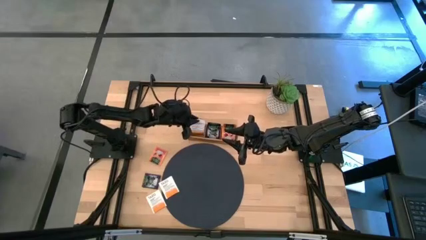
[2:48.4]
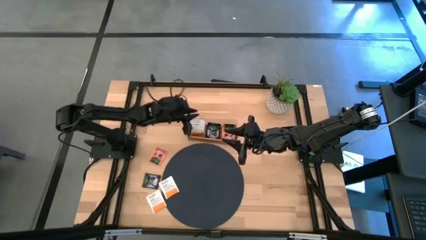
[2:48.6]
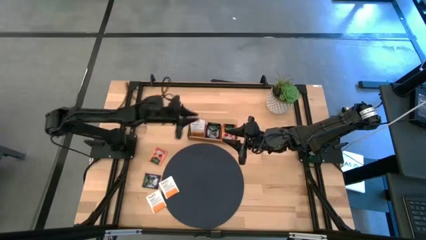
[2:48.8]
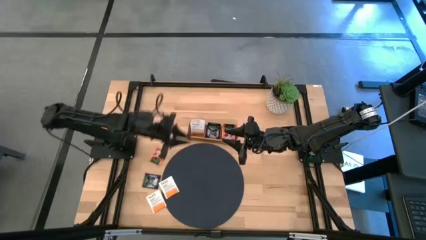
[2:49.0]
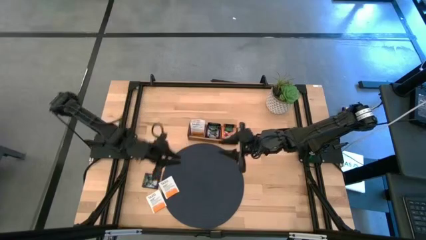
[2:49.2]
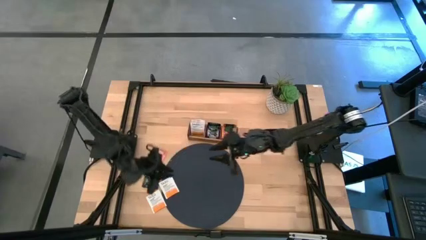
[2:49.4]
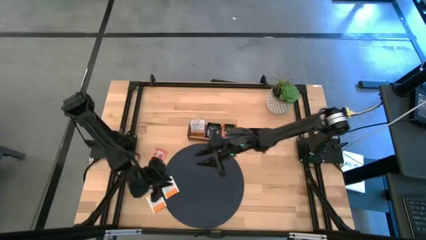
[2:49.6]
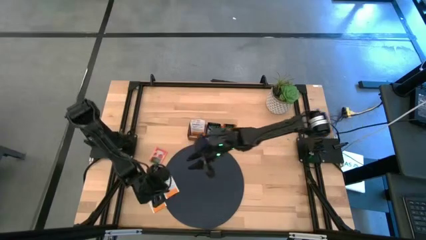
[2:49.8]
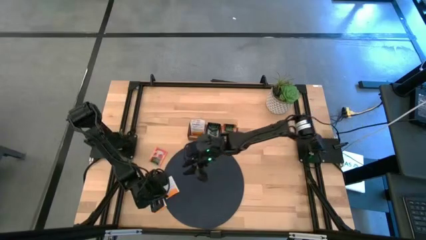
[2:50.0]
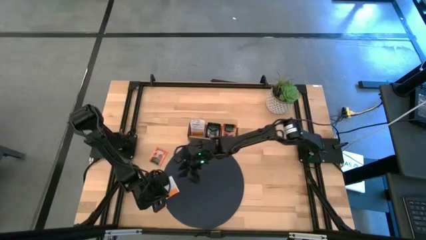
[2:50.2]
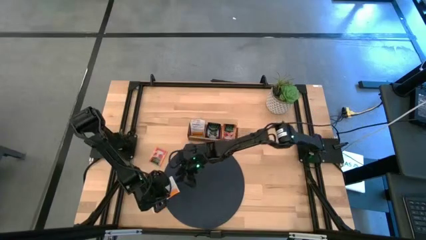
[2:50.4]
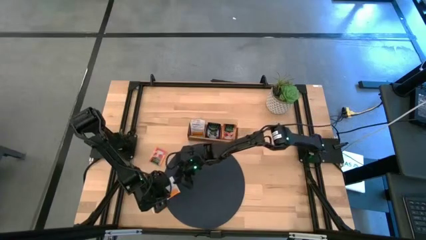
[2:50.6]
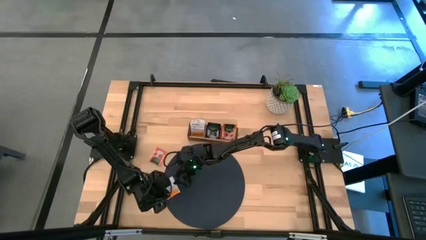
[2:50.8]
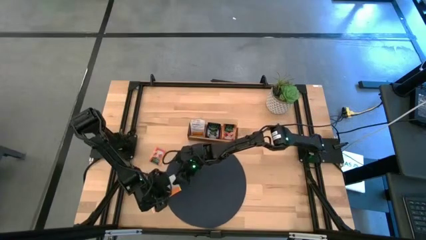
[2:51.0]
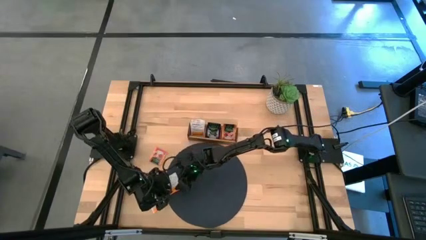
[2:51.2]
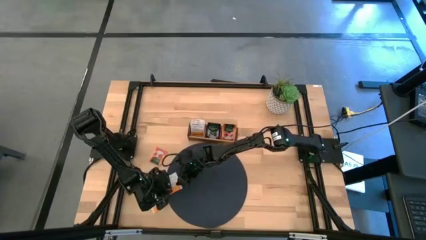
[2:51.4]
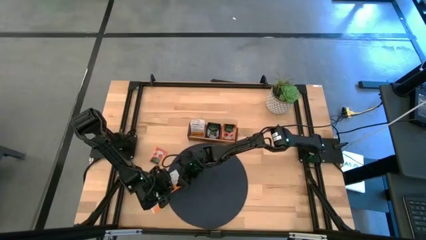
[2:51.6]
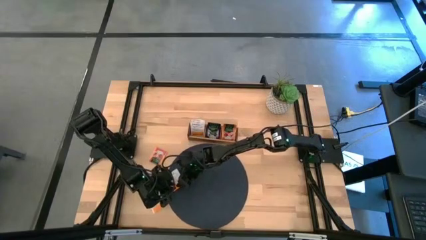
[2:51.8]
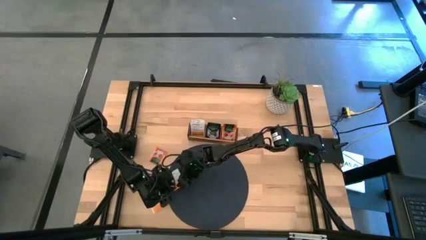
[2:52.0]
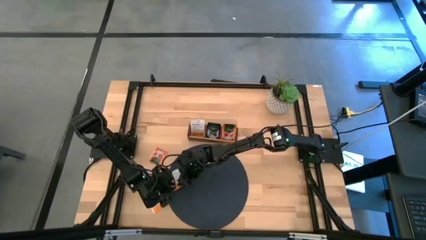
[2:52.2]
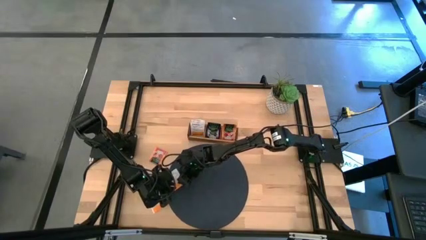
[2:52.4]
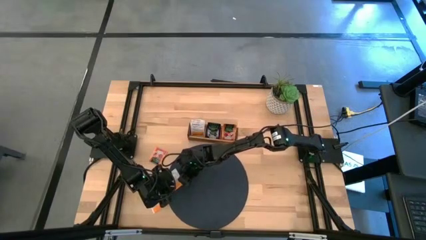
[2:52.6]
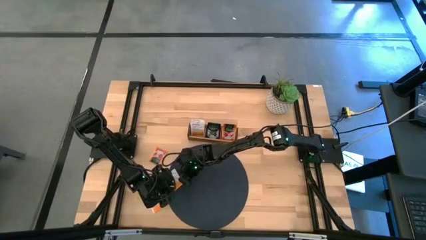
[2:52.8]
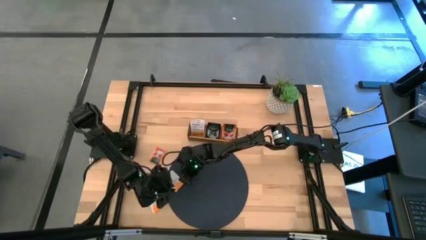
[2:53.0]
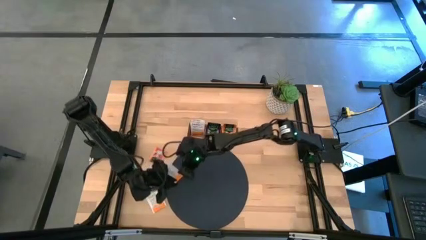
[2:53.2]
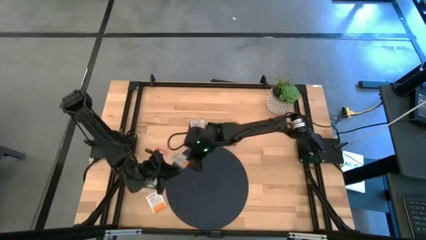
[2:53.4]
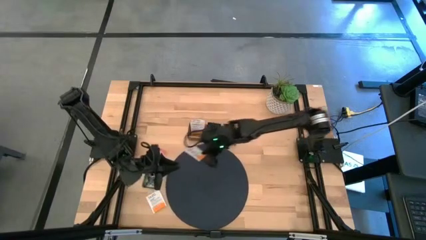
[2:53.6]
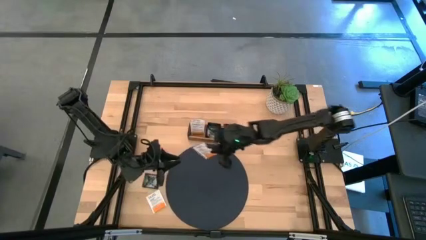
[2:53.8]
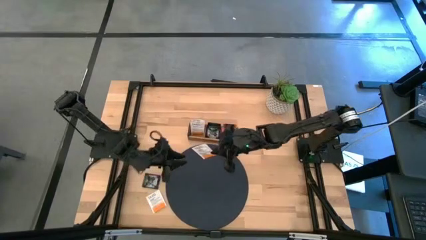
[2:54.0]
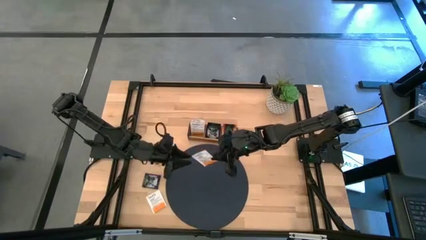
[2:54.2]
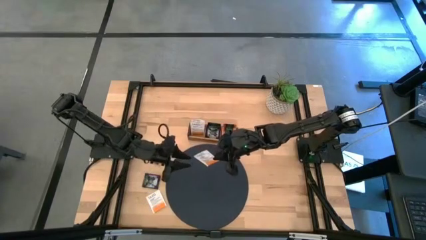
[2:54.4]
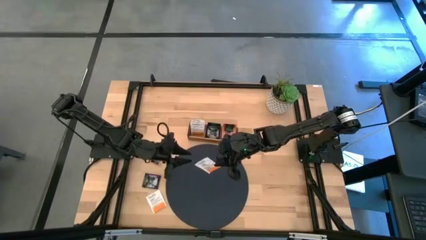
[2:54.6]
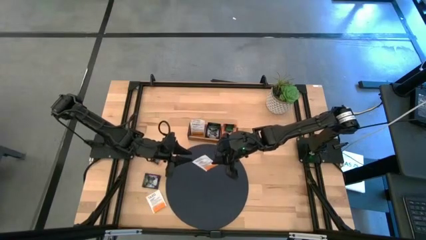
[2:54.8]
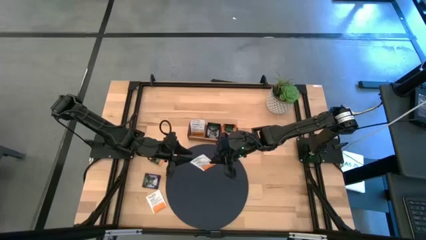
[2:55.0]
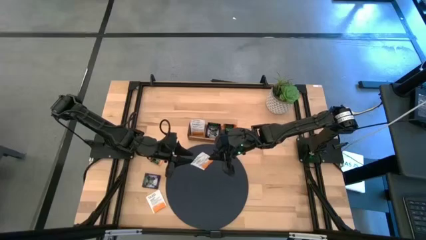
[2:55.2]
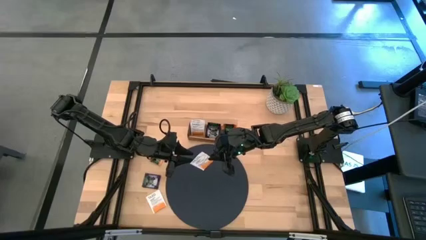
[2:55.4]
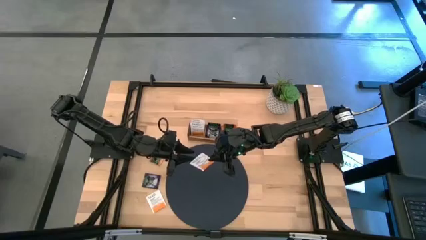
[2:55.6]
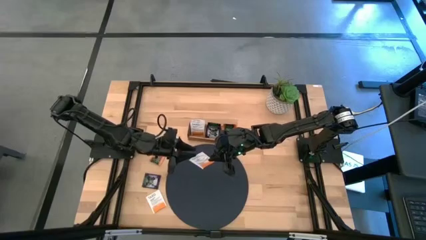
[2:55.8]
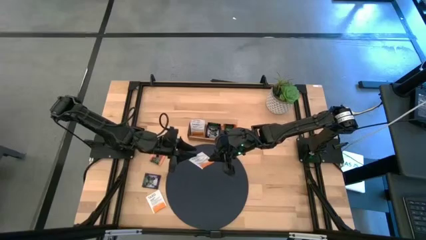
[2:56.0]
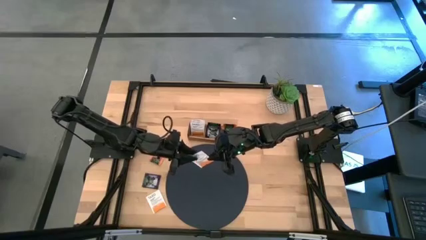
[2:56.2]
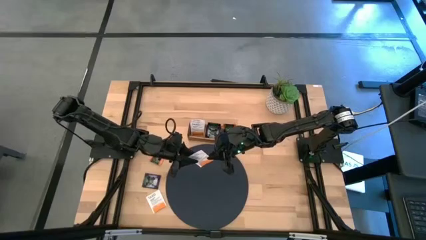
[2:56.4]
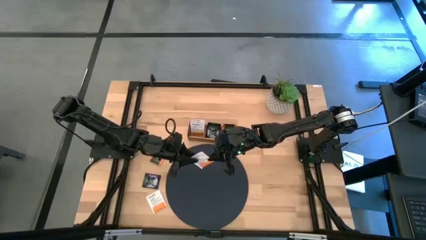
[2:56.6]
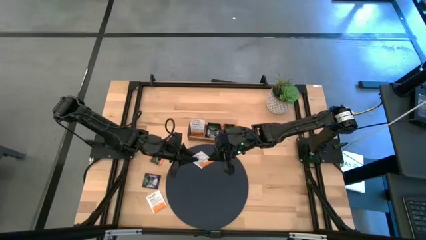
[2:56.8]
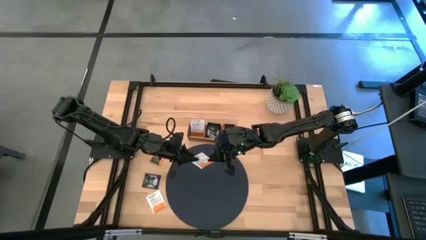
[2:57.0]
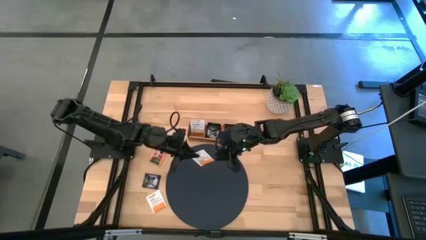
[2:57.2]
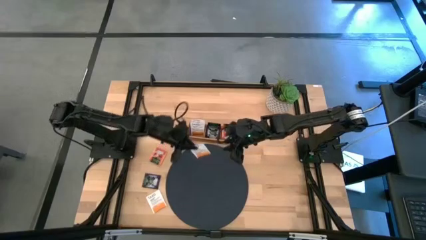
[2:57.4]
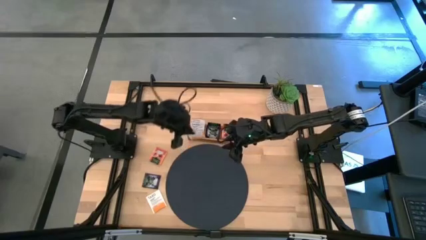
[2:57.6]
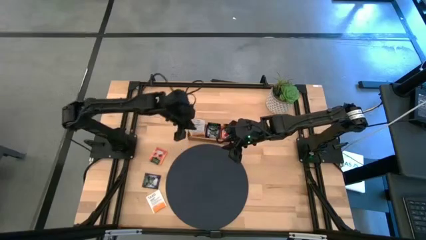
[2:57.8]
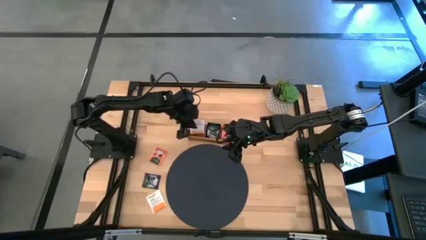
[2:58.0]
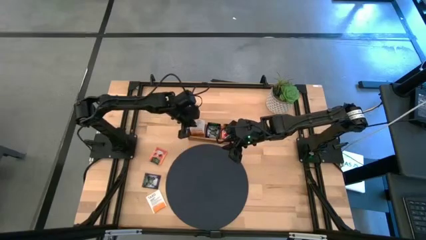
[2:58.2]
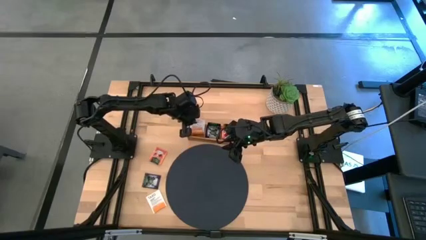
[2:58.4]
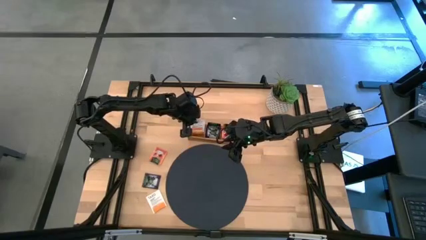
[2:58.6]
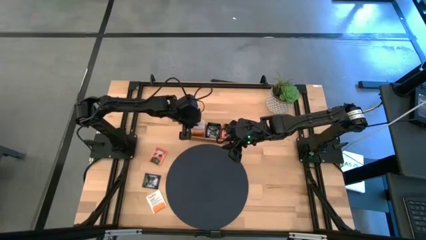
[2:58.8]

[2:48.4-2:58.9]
Task: Pick & Place Tea
Put the white tea bag into the left of the wooden organizer

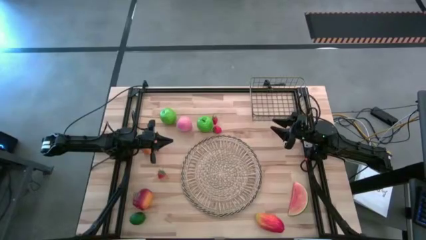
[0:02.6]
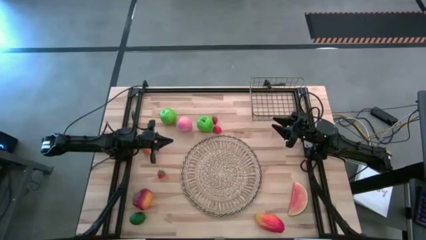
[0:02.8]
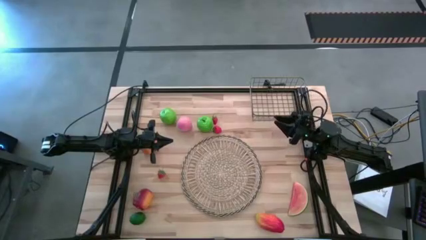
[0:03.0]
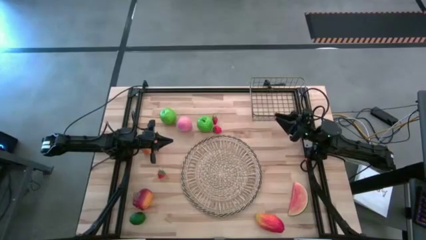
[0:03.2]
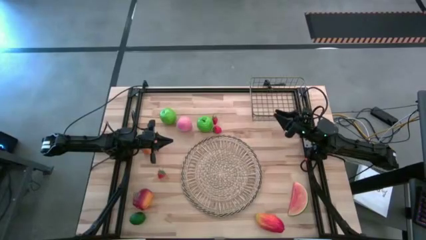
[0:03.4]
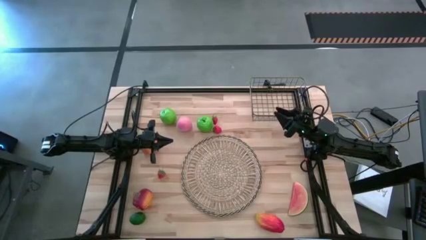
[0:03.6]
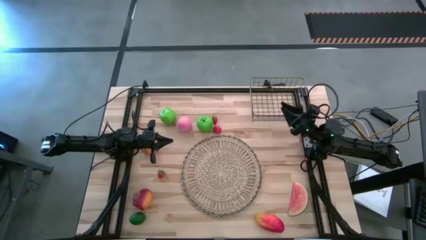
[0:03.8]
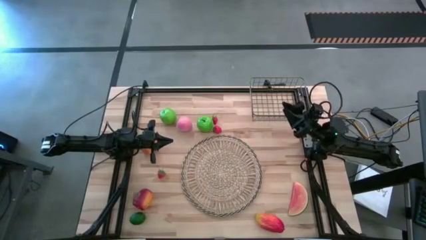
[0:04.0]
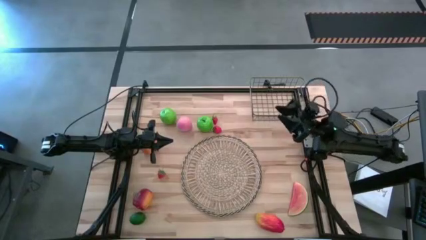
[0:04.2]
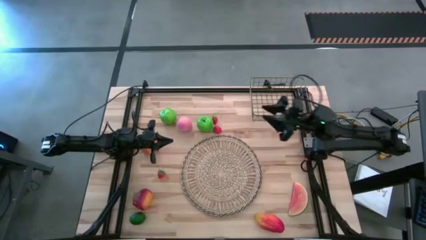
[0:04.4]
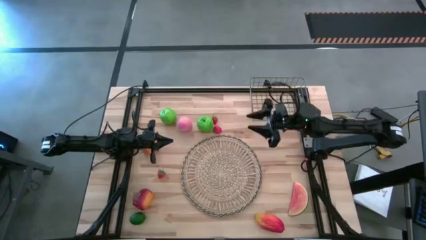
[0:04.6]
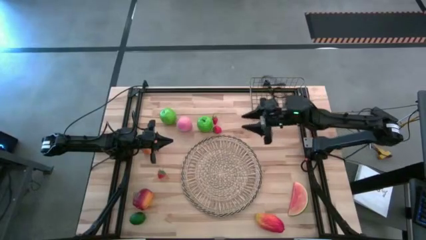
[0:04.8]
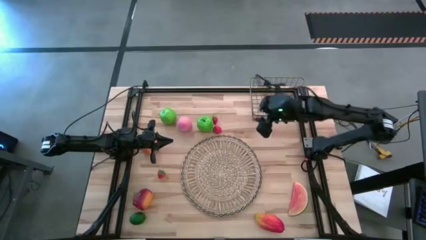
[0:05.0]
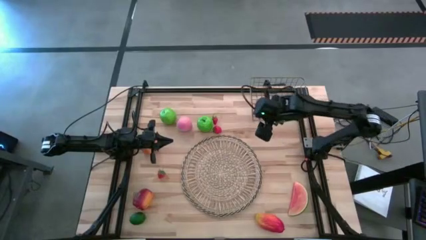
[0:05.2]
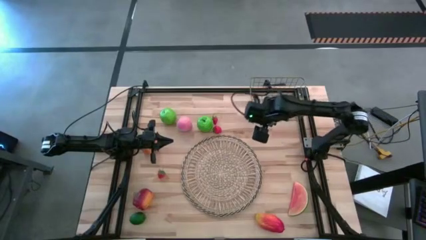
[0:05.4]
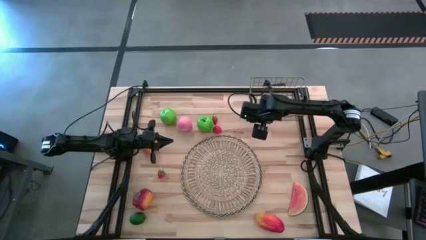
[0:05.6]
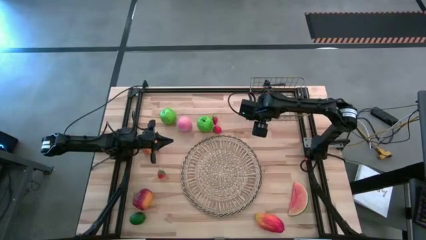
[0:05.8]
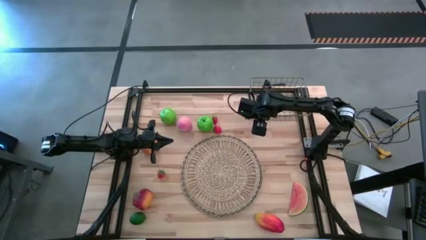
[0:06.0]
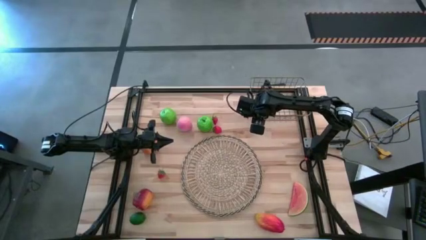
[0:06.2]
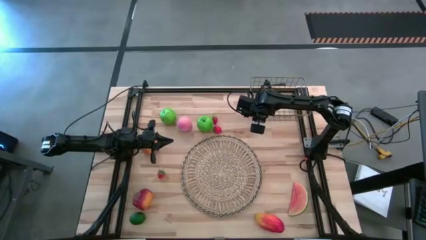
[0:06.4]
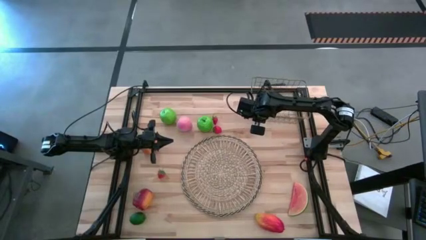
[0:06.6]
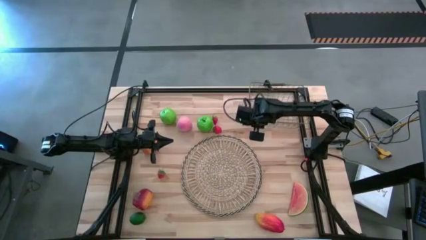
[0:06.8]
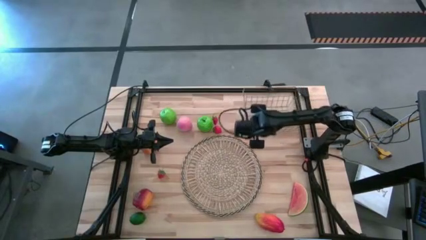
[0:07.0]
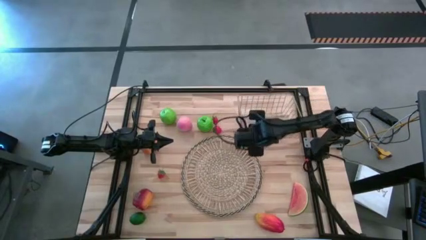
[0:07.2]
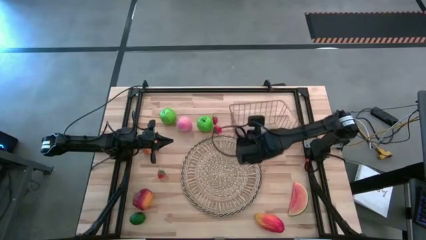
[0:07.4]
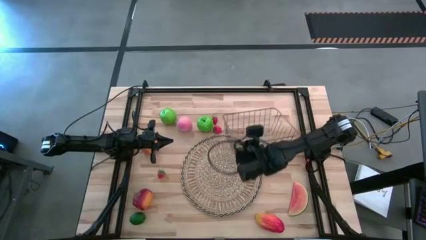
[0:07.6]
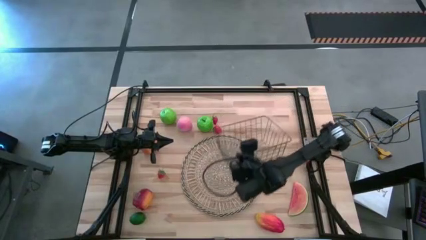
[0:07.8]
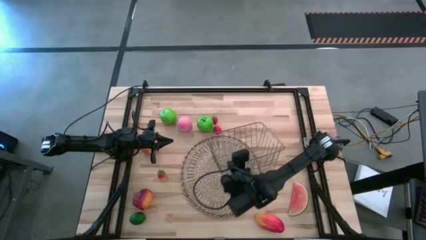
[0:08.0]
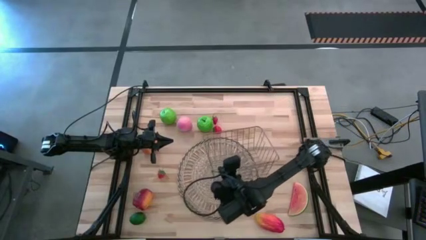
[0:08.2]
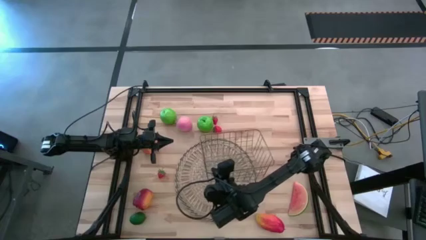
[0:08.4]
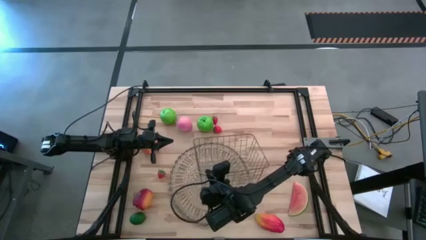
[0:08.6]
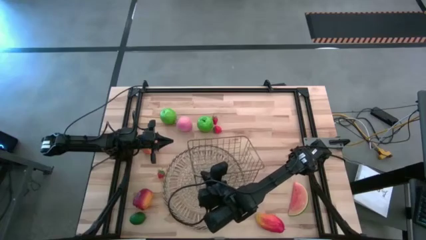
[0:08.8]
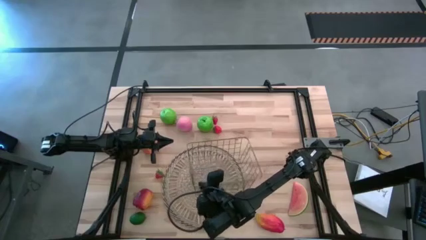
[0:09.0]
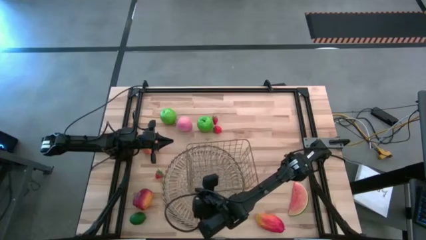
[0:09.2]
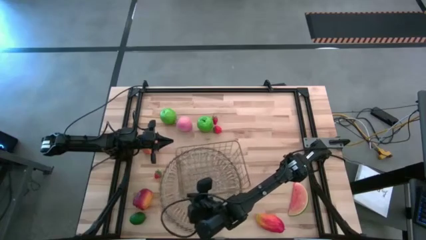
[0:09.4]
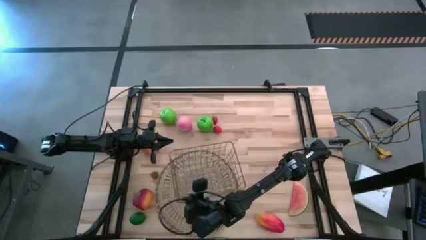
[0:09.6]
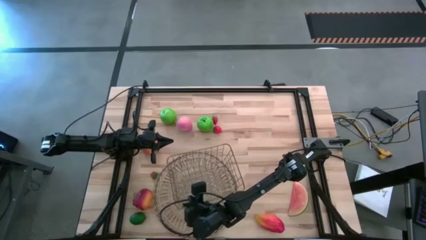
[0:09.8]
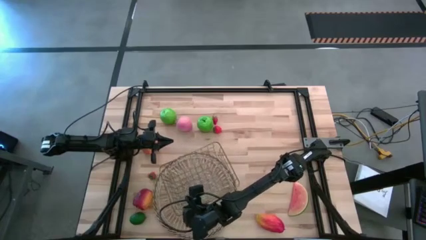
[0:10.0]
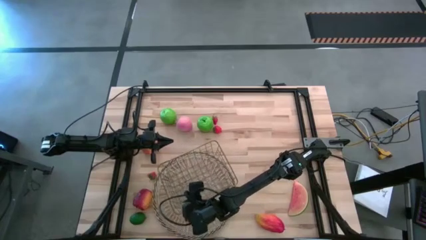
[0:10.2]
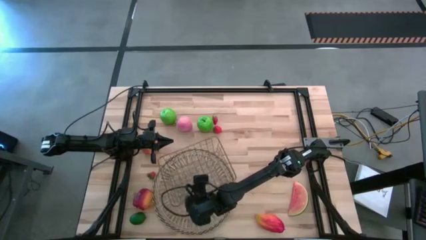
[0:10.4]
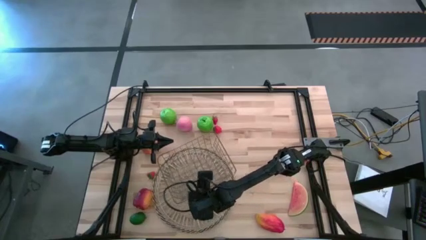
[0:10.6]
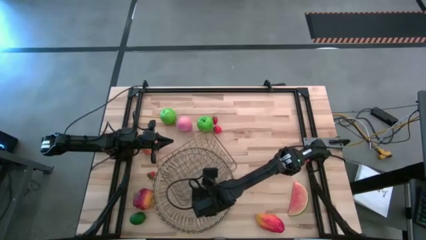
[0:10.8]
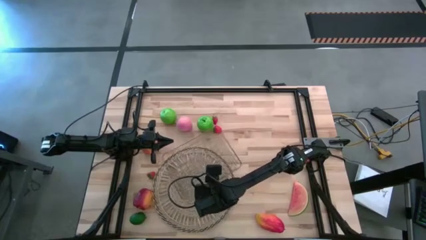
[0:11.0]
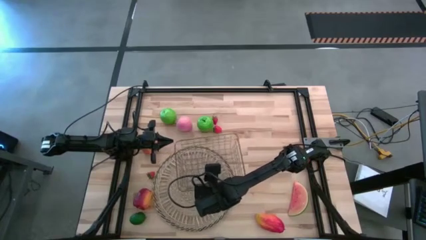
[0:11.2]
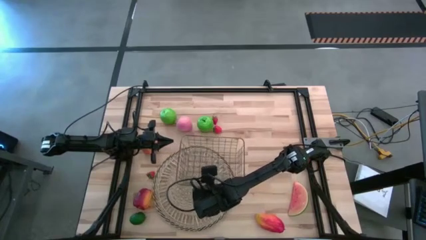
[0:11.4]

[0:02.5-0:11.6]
Task: Build produce basket
Move the gold wire basket on the brown mat
